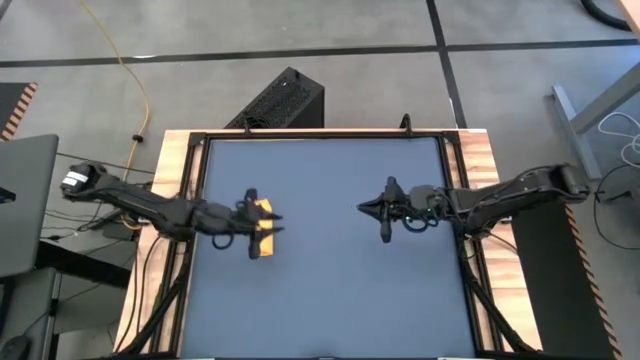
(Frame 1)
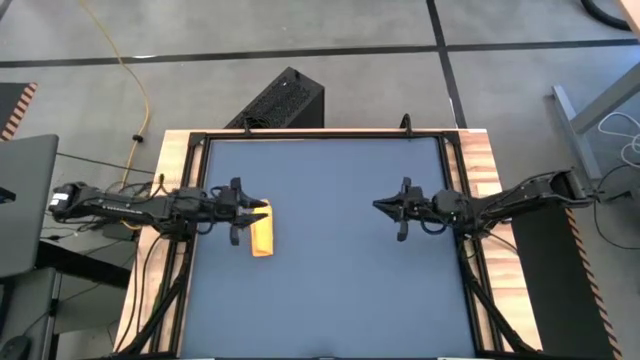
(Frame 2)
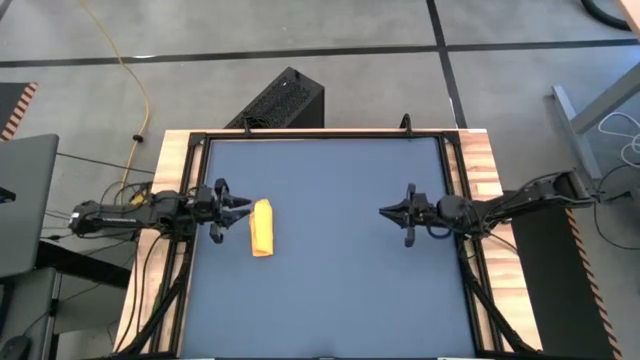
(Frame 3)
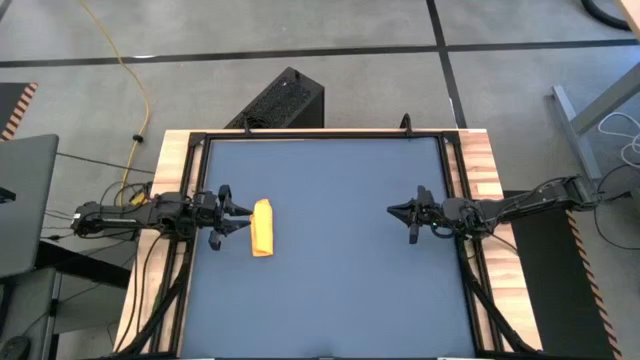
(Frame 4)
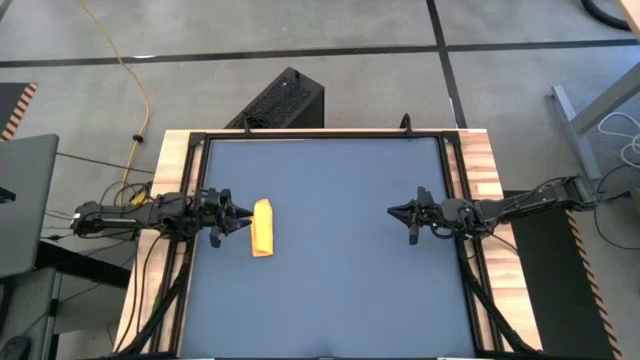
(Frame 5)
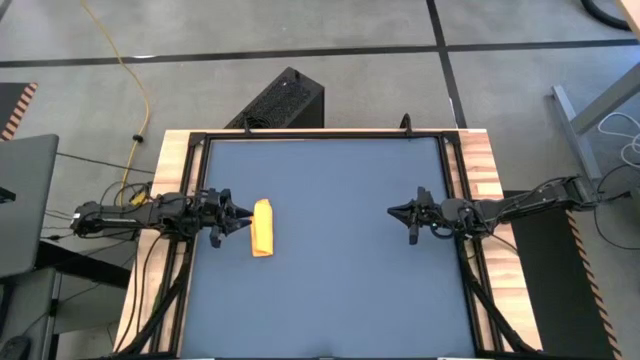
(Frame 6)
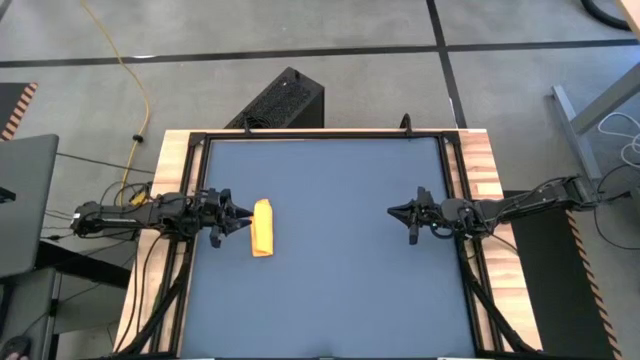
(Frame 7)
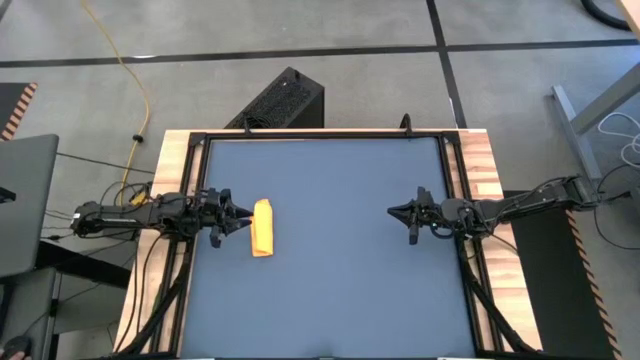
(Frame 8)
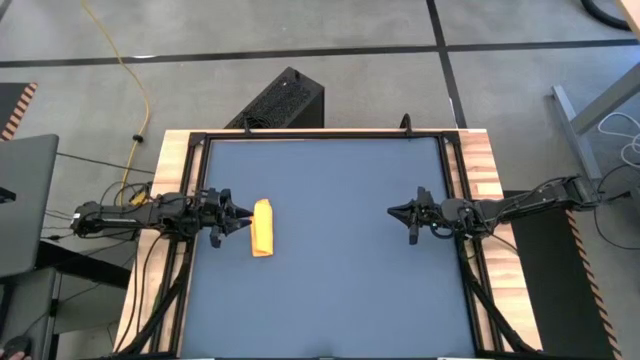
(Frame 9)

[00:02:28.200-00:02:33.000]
Task: Roll towel
Return to Home Position

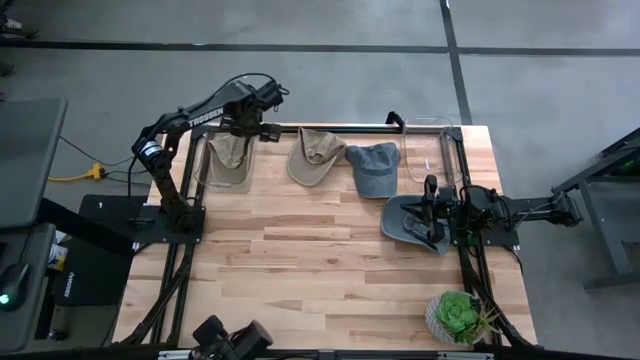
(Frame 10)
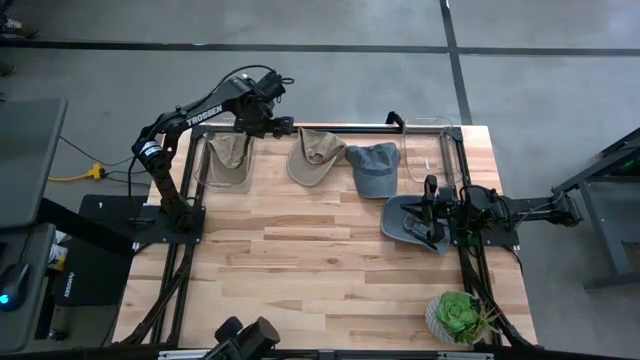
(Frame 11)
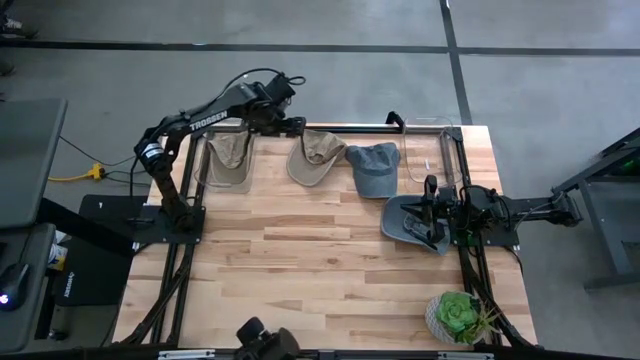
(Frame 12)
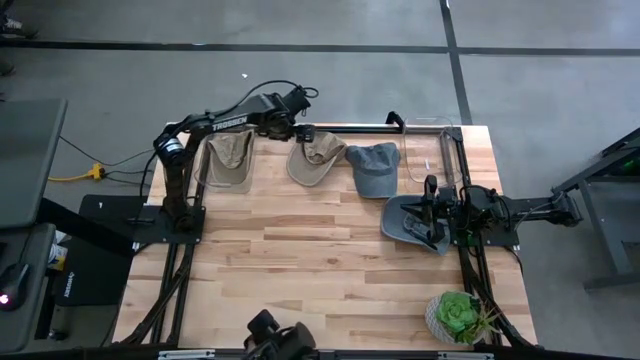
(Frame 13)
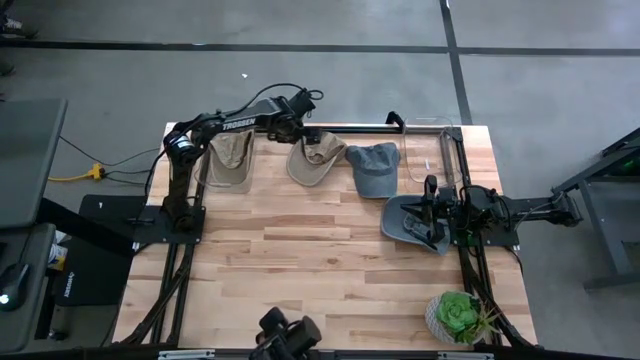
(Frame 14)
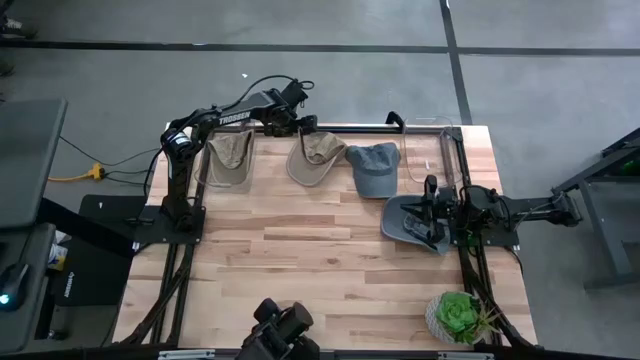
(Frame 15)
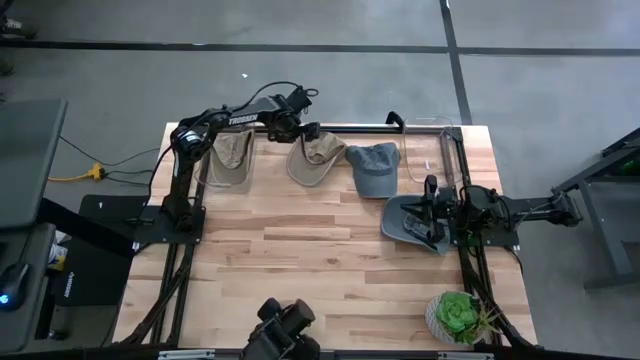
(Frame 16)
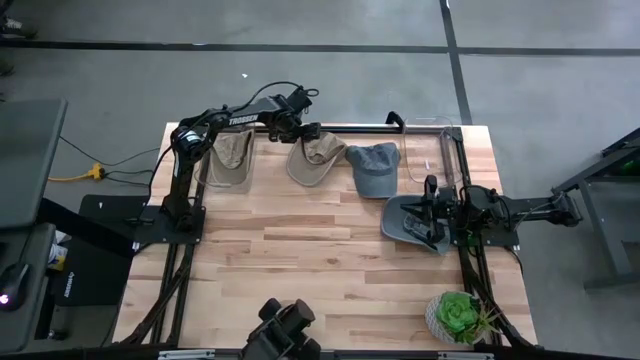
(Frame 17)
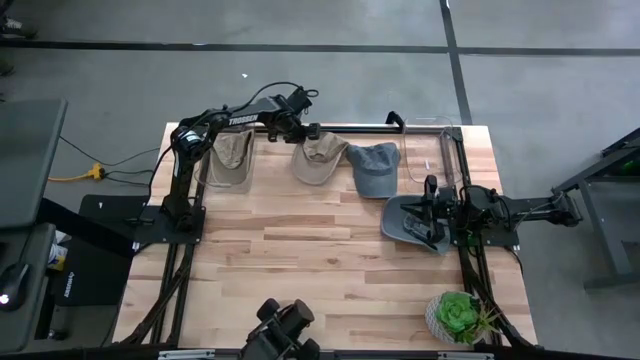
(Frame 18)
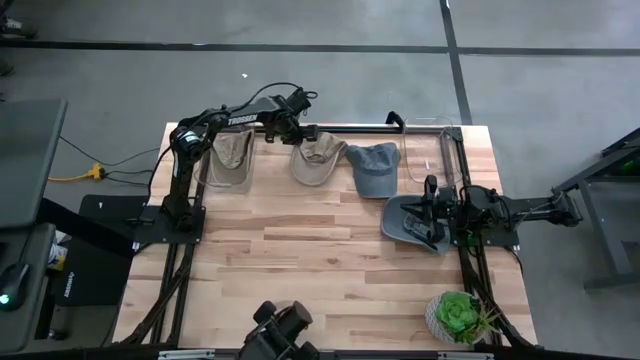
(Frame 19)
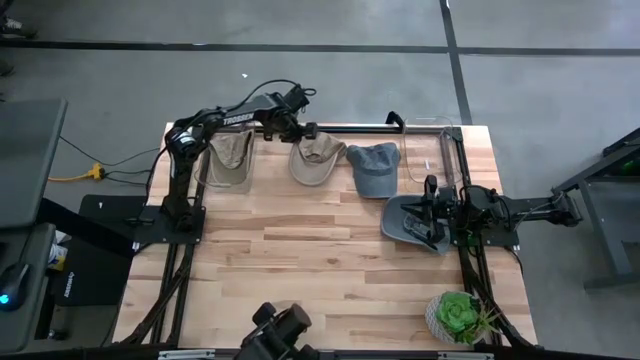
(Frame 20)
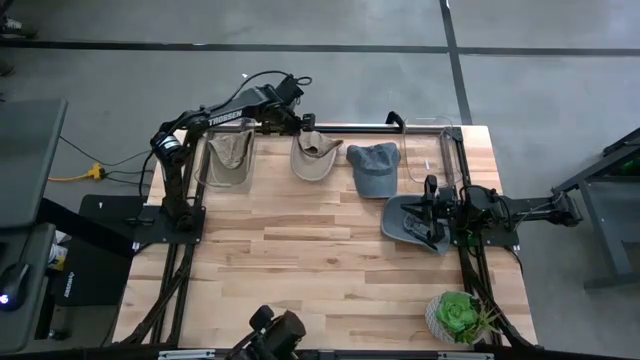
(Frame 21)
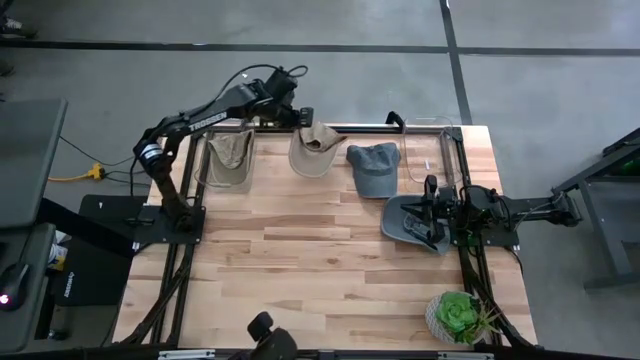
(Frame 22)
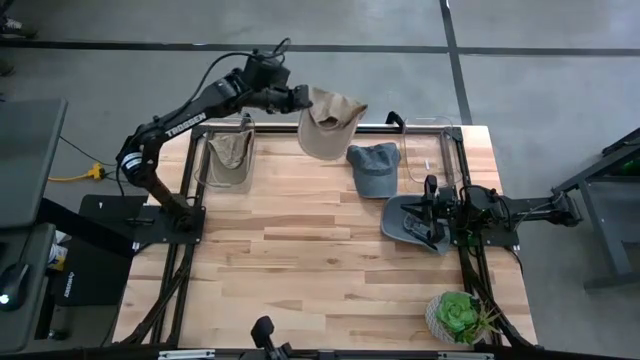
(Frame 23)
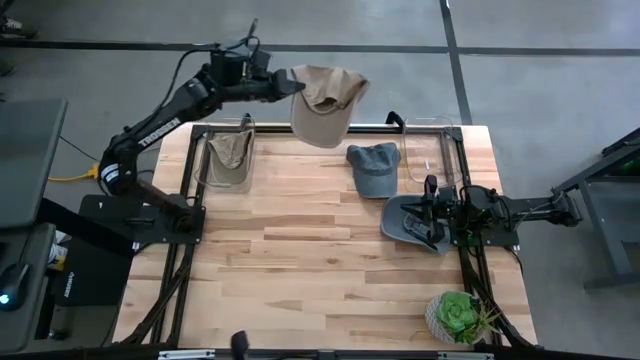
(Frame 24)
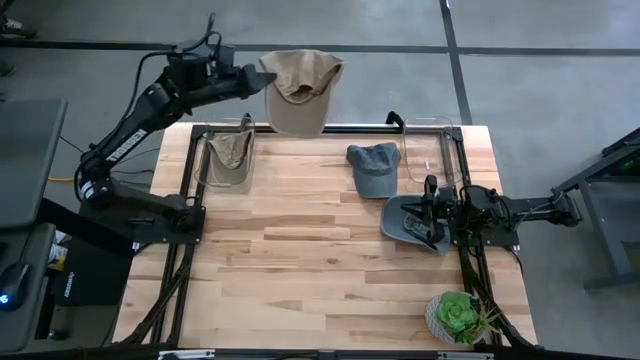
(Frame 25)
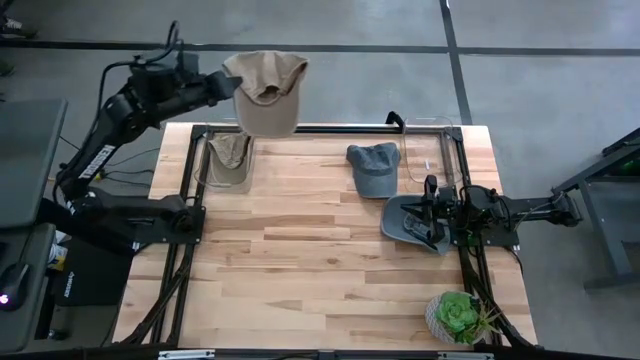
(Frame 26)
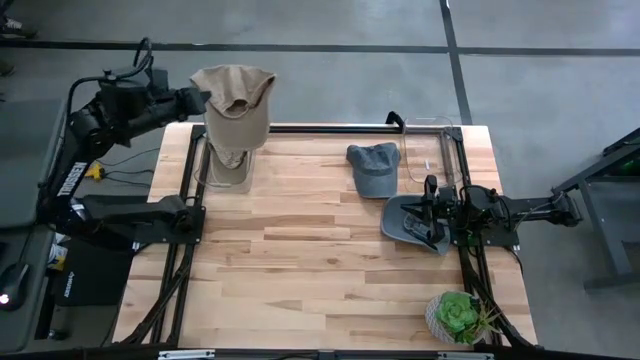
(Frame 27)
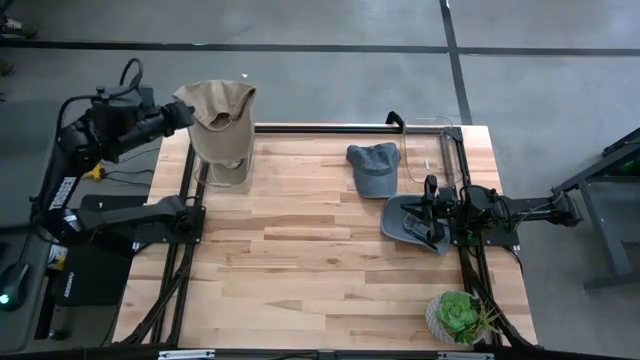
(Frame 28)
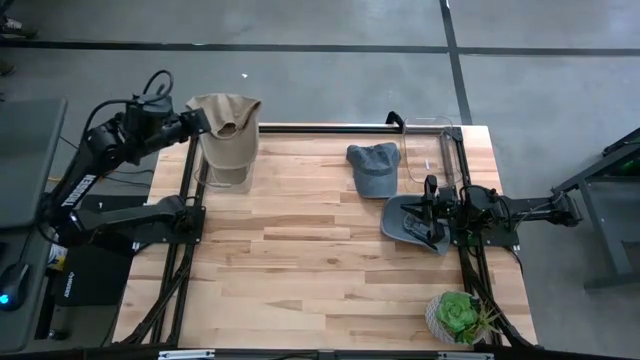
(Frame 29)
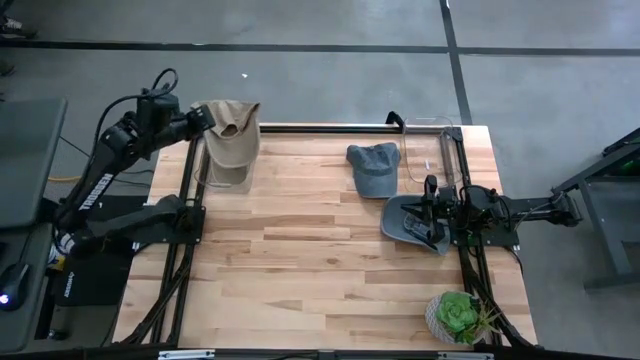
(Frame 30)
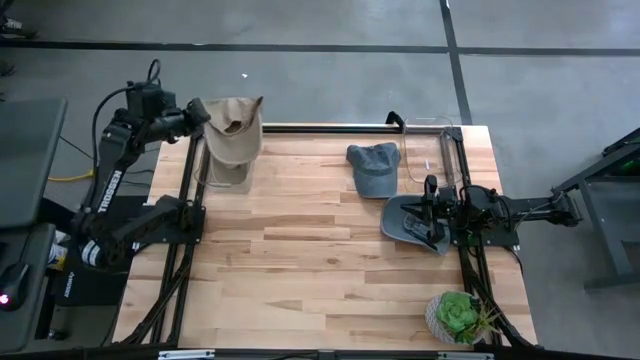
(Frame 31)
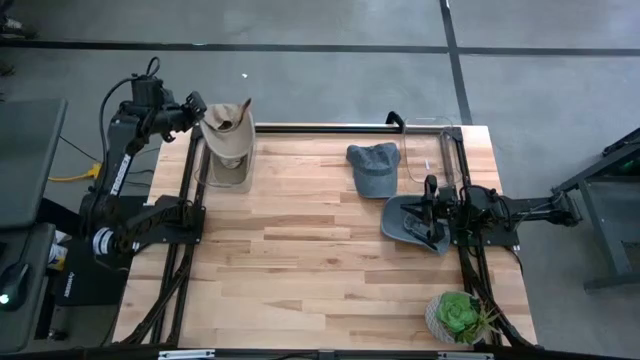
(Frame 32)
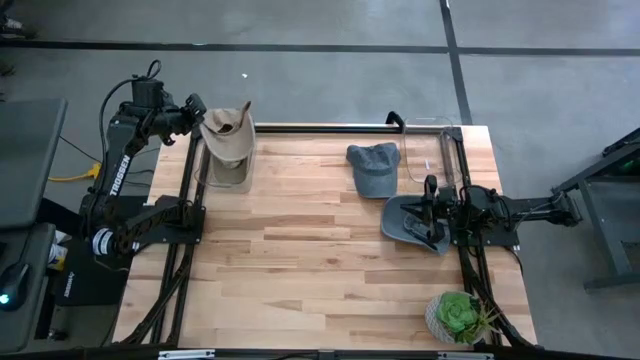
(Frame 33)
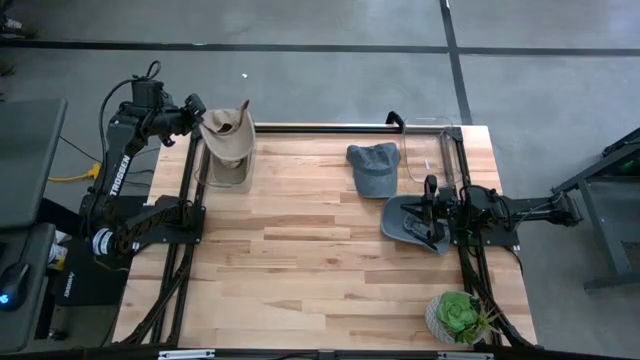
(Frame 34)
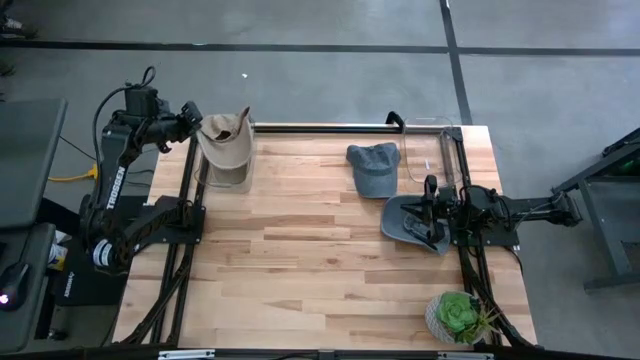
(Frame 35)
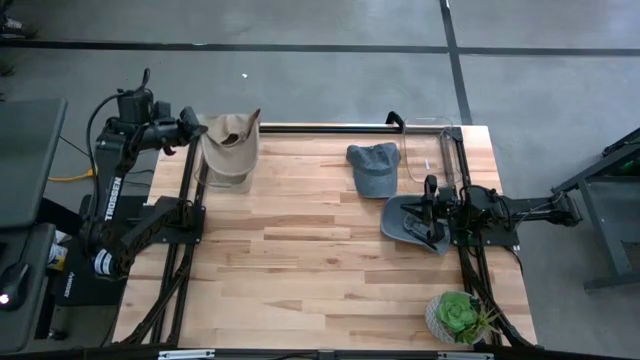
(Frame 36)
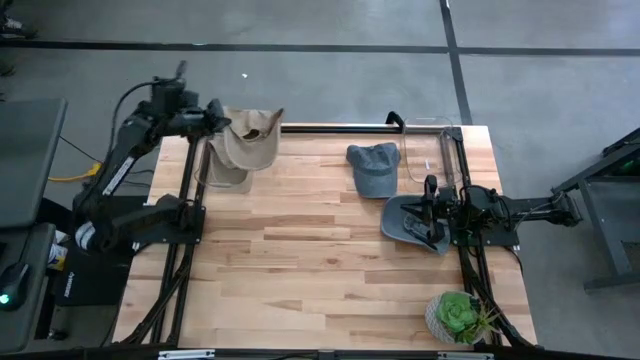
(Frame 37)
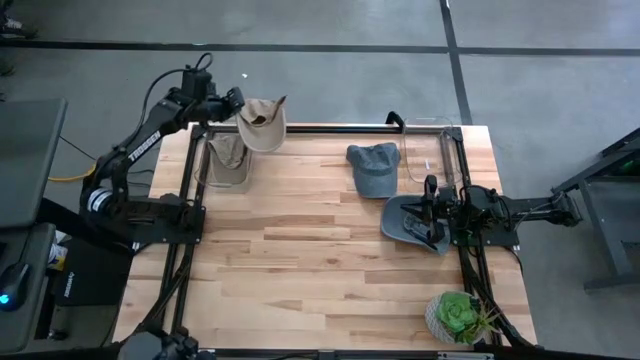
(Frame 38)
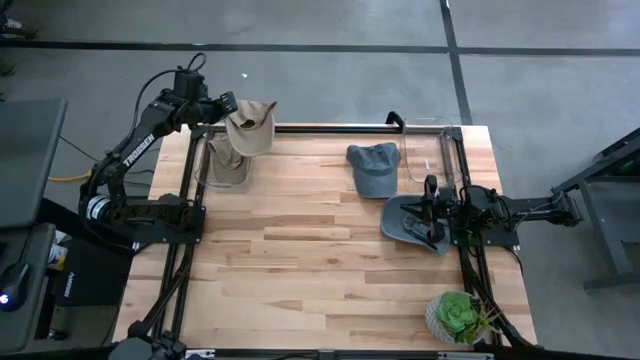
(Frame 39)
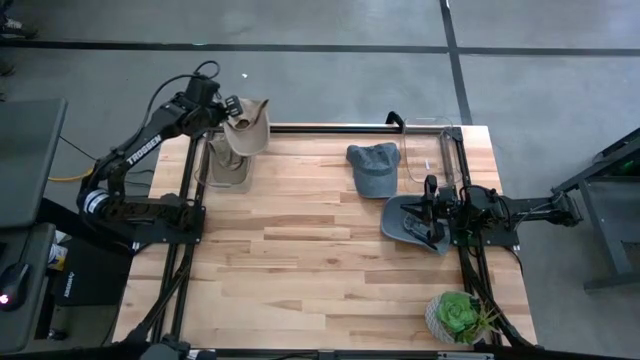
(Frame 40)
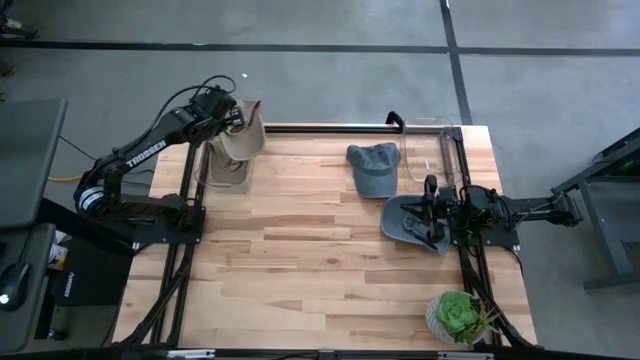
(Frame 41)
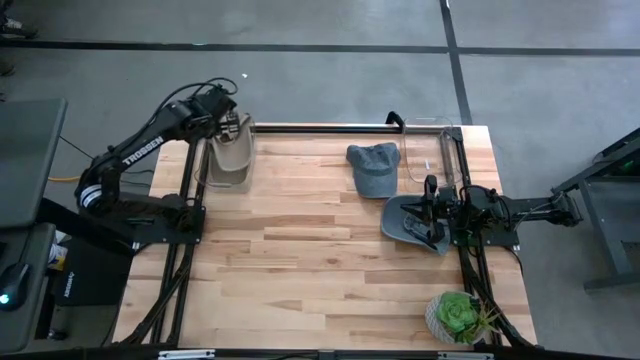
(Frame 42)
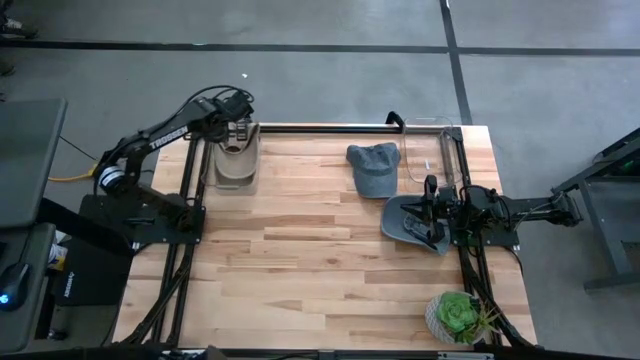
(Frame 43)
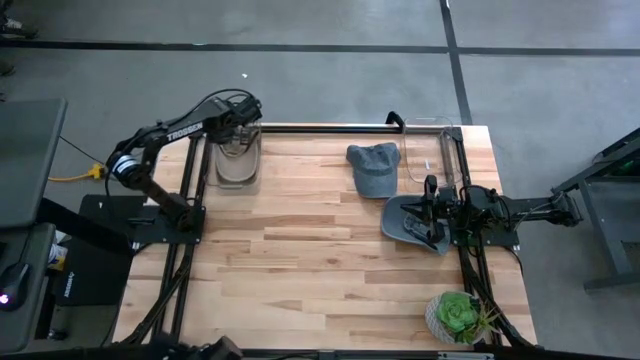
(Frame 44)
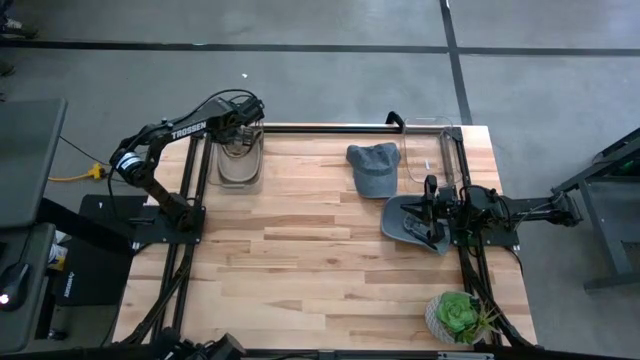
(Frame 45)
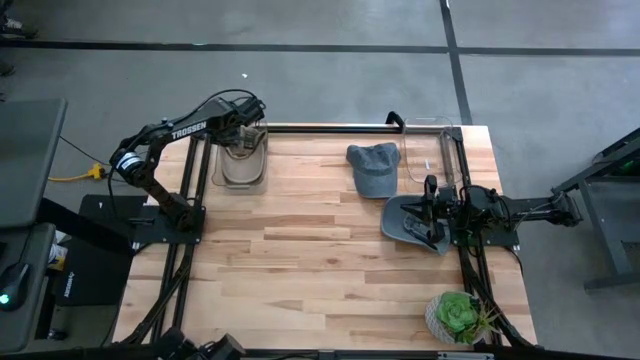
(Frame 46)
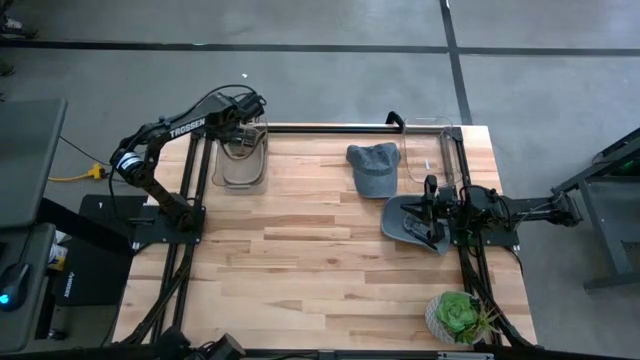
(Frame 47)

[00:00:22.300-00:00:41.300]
Task: Pick & Place hat
Put the brown cap into the left transparent bin
